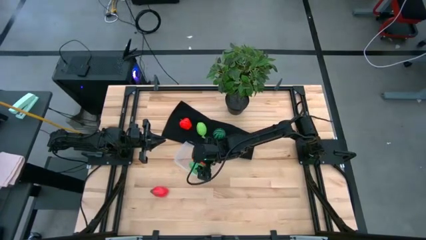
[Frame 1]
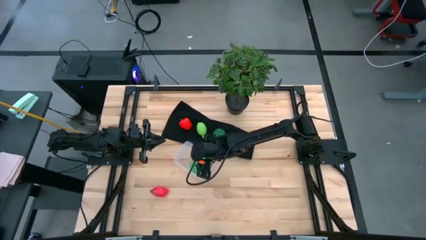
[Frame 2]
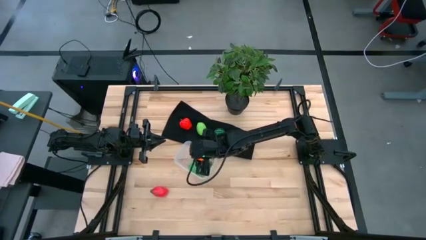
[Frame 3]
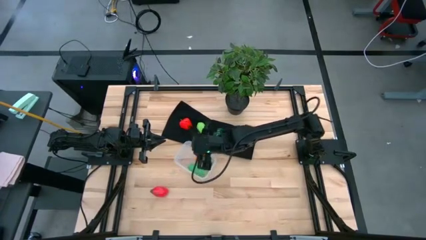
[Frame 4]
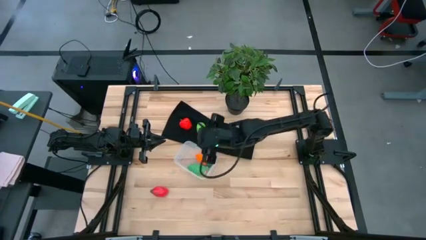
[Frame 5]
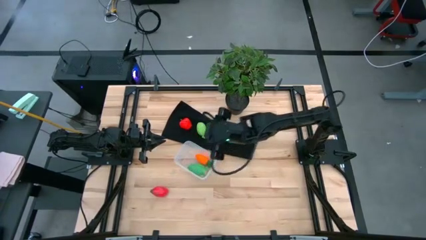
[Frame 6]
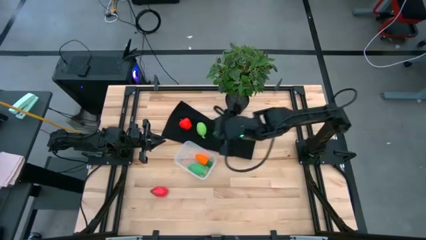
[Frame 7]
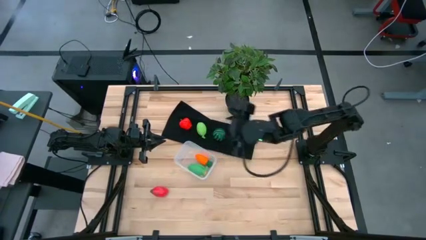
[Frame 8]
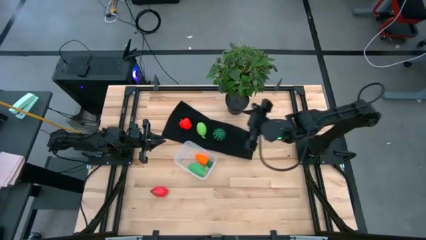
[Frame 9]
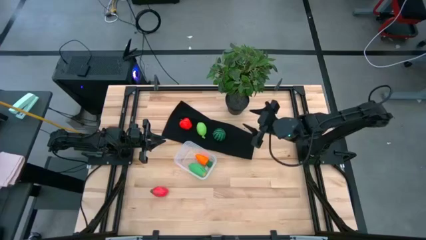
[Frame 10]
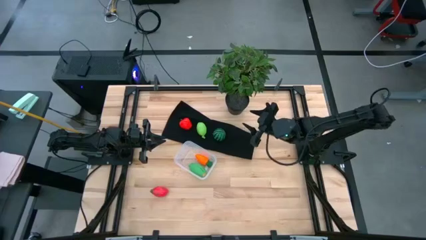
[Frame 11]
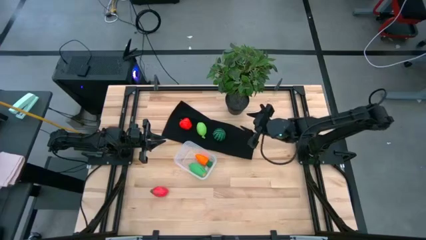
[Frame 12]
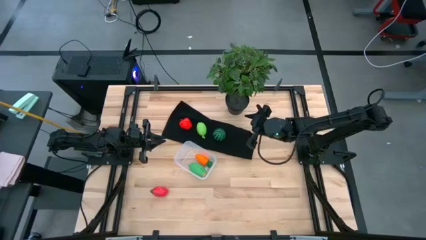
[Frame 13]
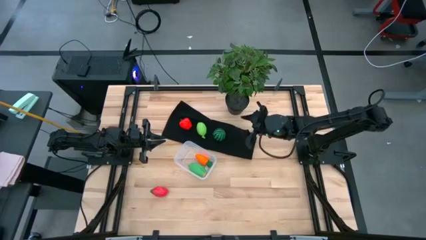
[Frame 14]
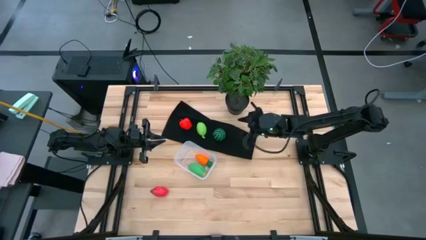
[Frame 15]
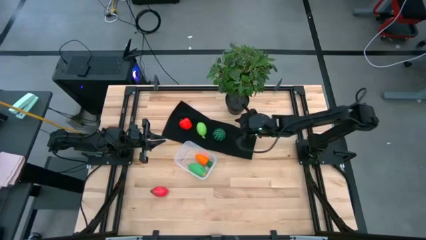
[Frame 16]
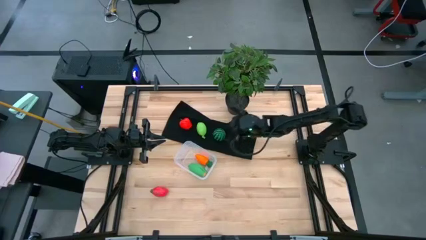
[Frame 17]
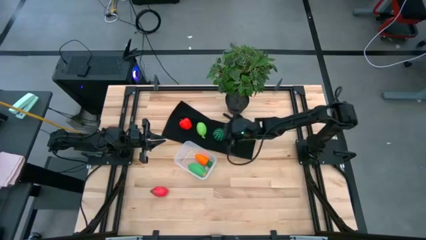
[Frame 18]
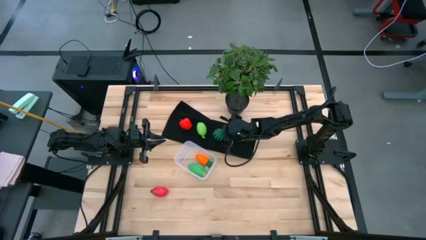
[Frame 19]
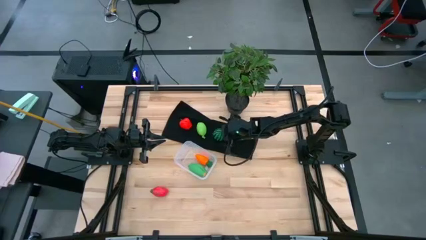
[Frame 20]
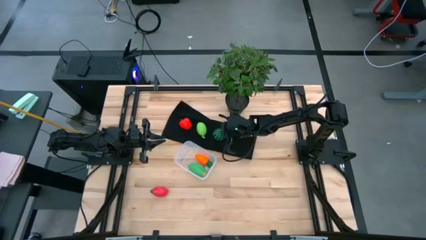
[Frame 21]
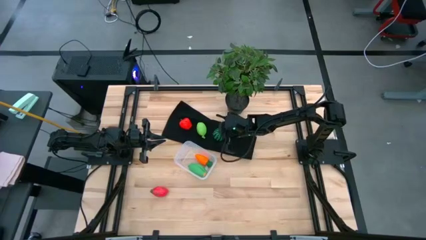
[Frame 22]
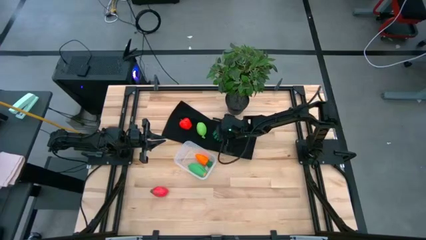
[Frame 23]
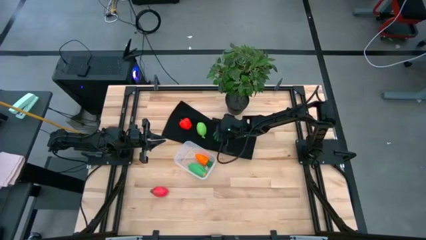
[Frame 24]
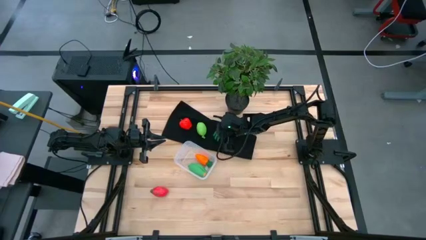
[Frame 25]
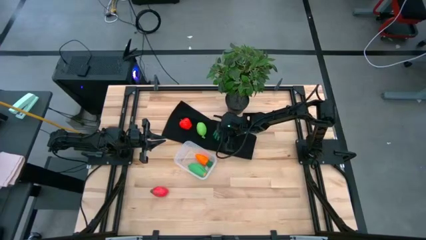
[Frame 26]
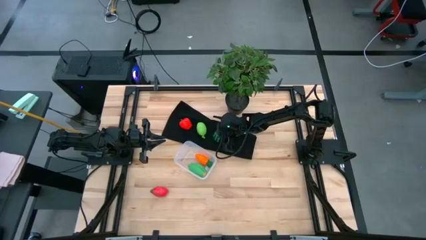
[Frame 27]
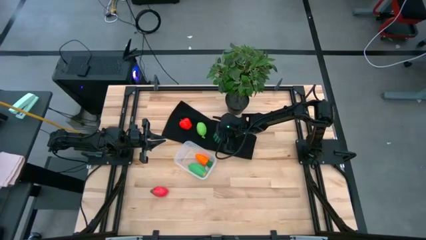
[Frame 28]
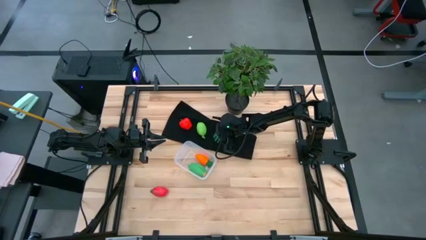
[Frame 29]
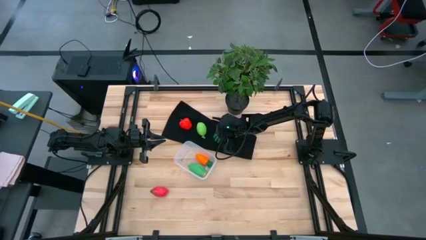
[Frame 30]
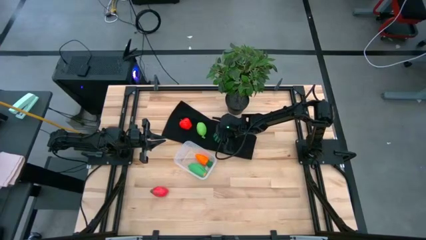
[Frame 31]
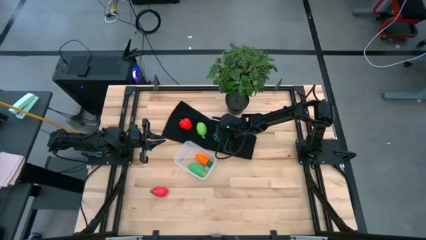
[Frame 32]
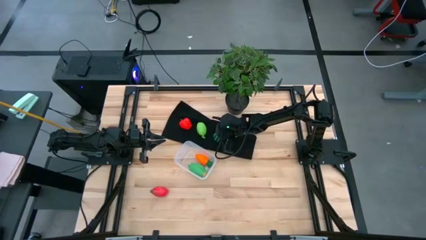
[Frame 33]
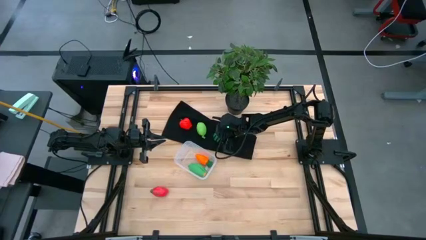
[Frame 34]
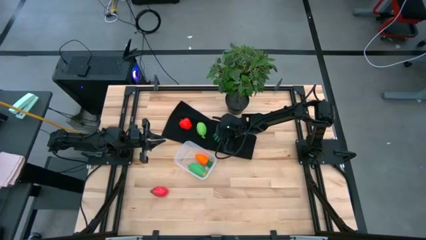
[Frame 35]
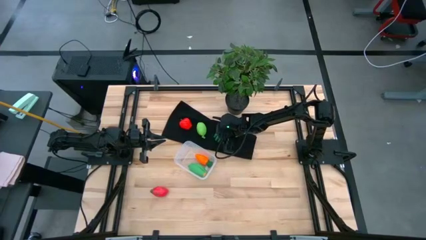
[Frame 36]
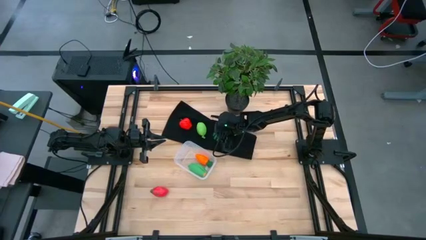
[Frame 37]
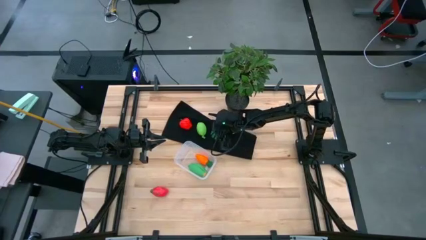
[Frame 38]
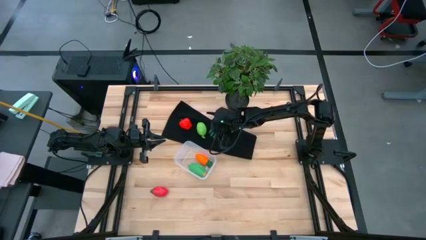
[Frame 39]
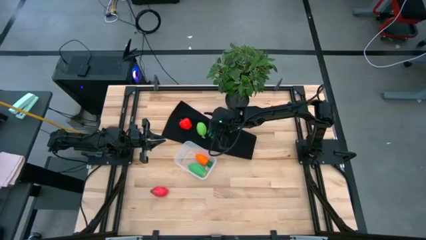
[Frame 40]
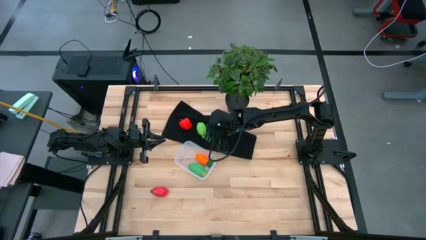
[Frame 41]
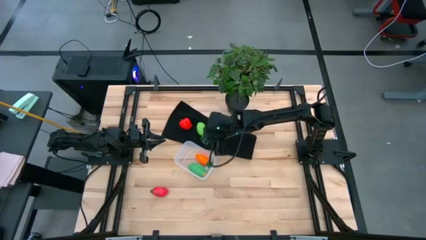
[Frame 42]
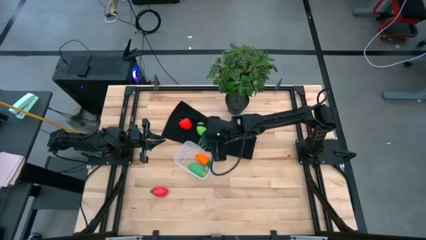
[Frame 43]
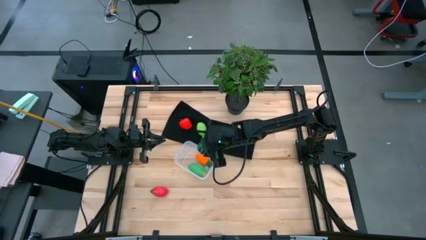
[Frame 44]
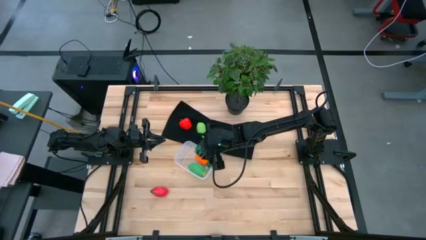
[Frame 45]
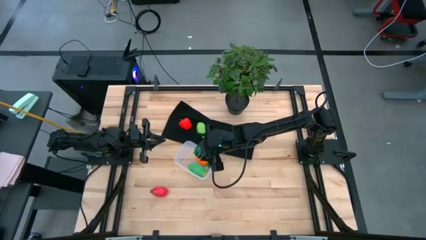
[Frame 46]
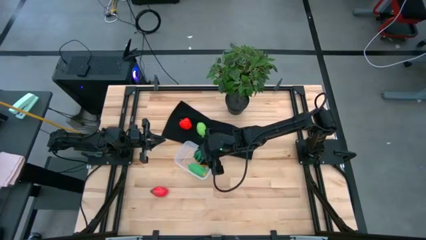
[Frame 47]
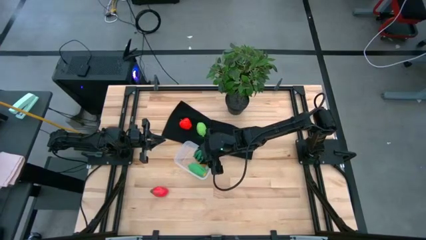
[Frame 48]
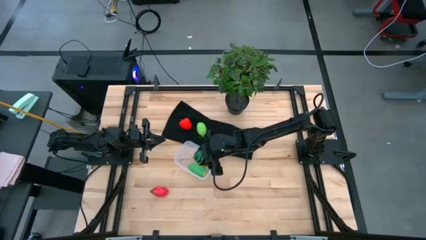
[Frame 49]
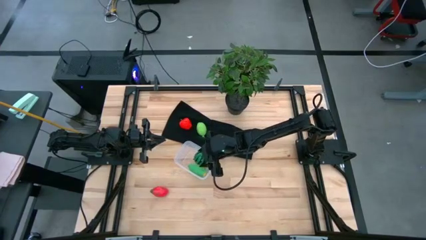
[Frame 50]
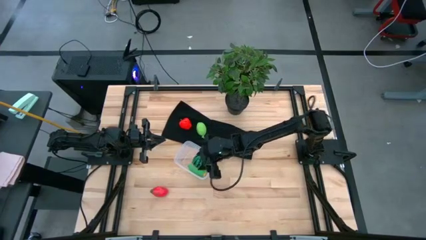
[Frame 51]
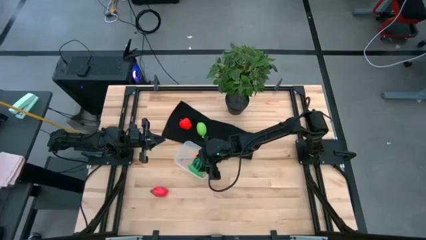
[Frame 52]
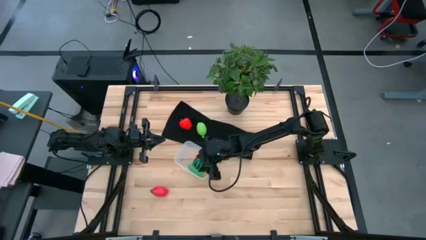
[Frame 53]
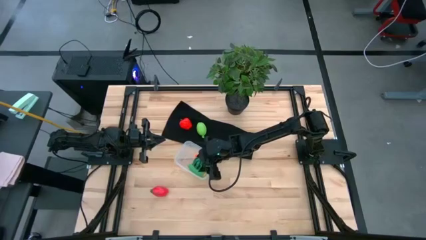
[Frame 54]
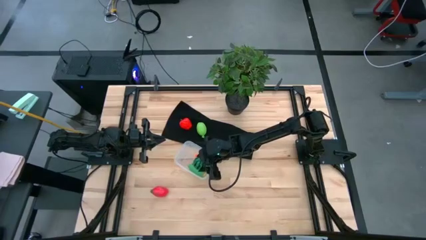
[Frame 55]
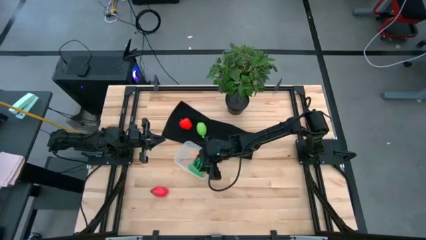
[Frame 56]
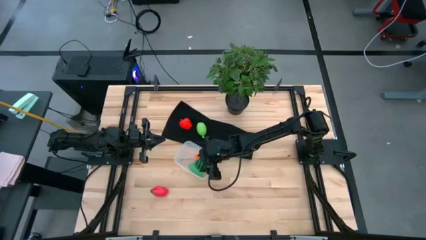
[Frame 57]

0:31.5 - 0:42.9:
Task: Pick and placing Produce into tupperware
Put the green watermelon into the transparent bin
